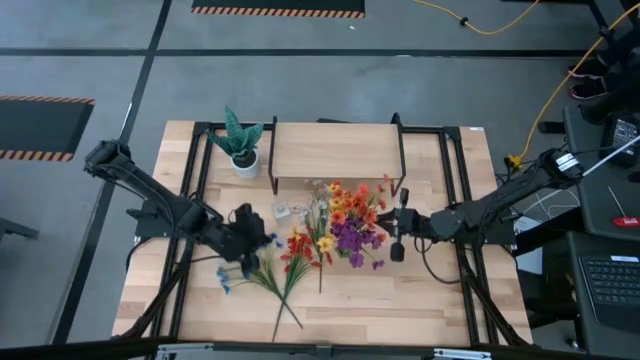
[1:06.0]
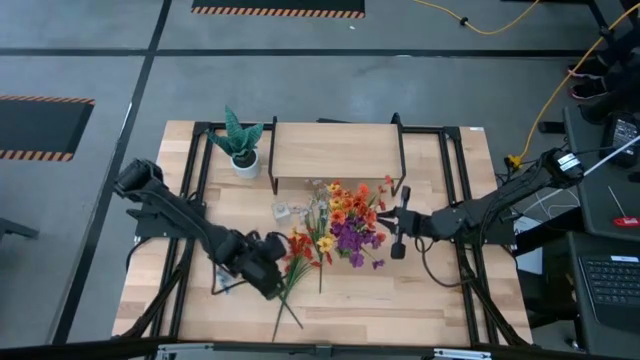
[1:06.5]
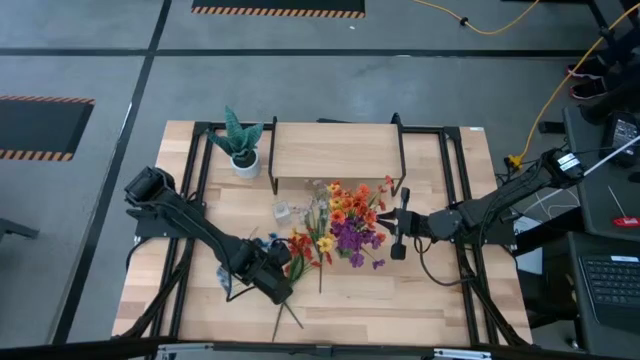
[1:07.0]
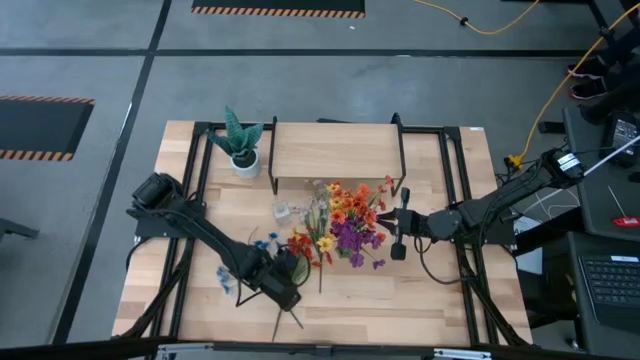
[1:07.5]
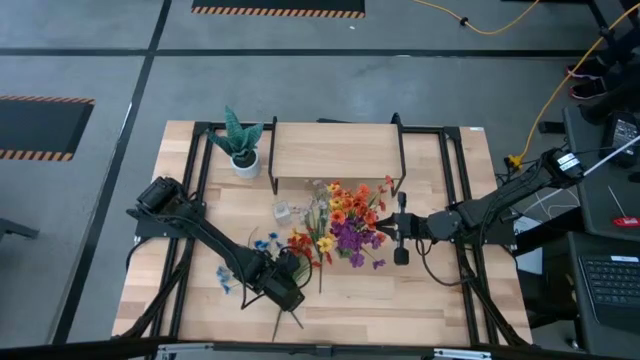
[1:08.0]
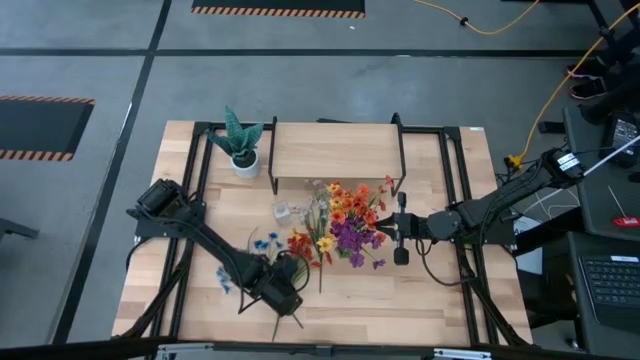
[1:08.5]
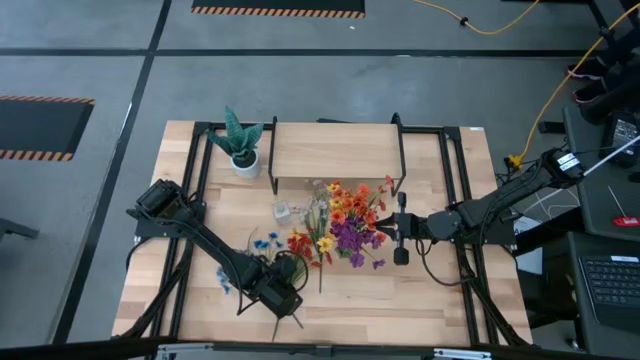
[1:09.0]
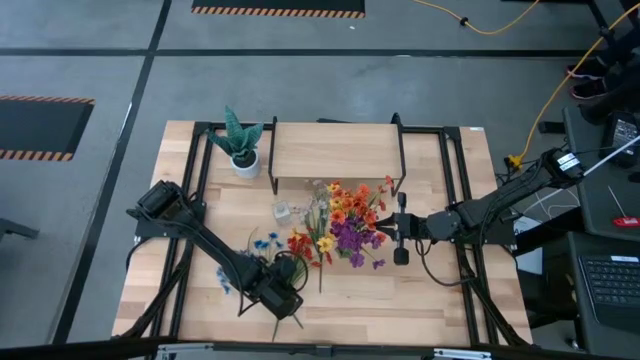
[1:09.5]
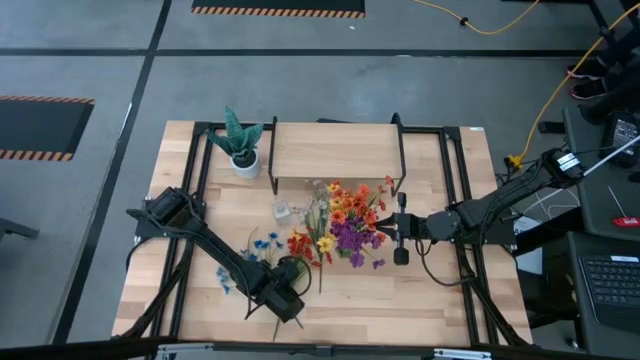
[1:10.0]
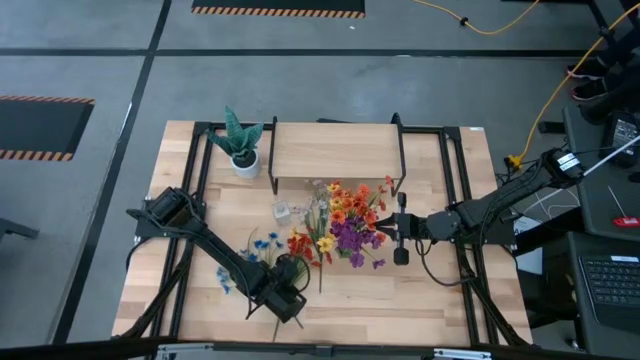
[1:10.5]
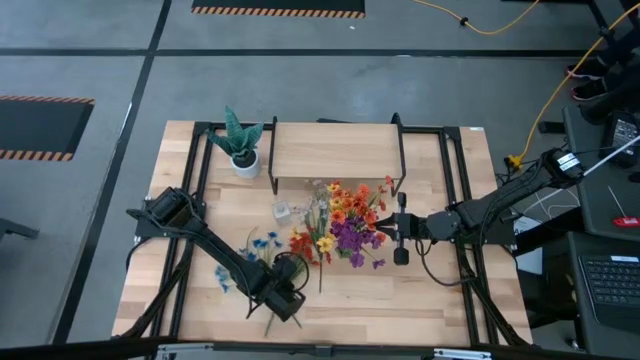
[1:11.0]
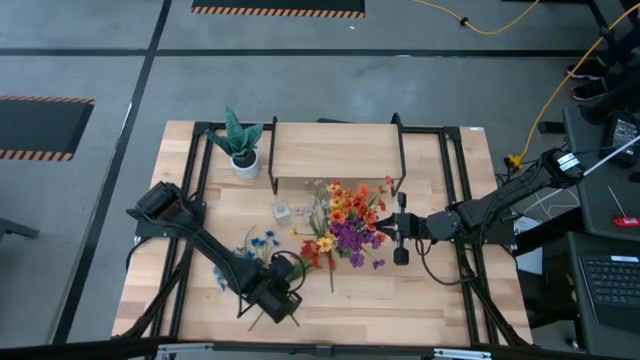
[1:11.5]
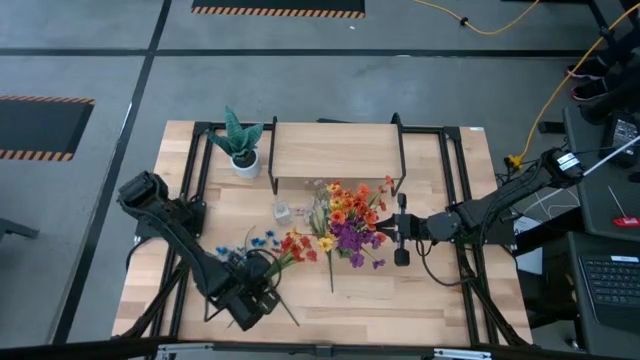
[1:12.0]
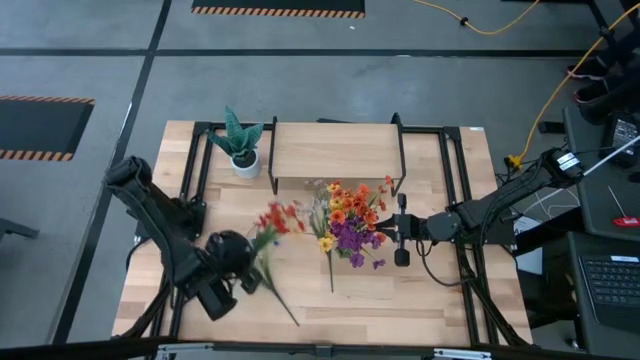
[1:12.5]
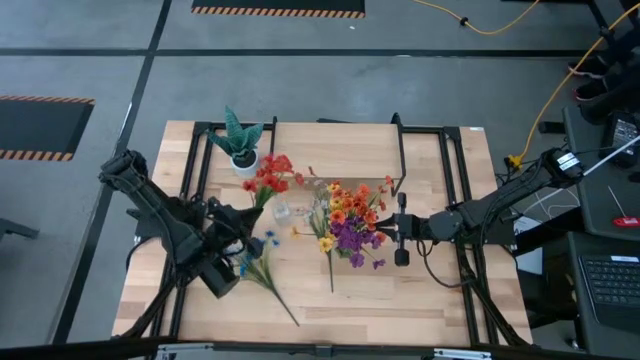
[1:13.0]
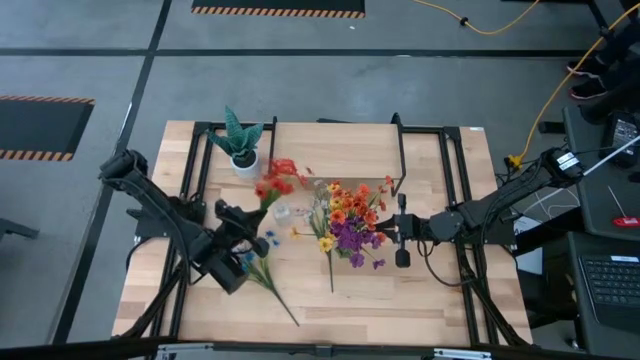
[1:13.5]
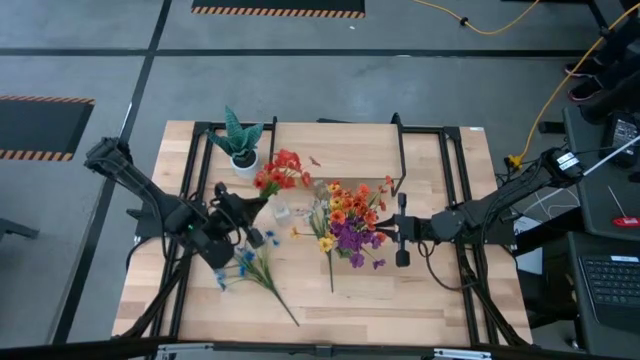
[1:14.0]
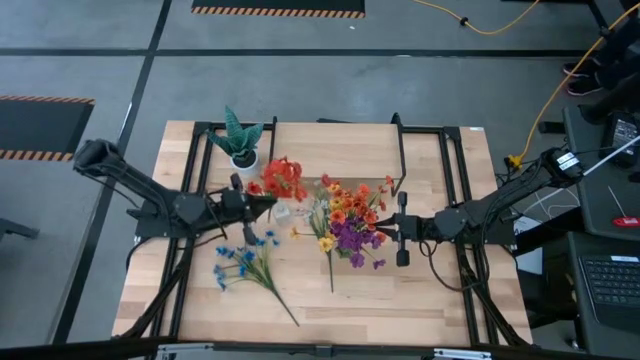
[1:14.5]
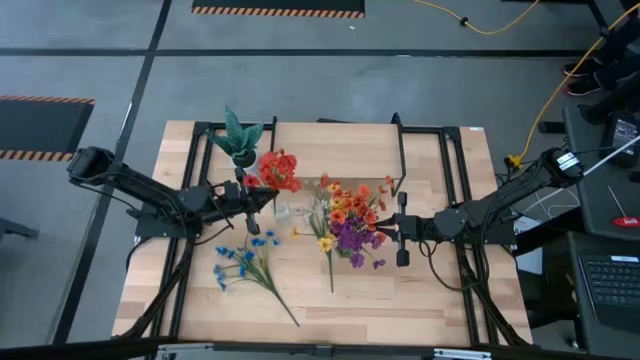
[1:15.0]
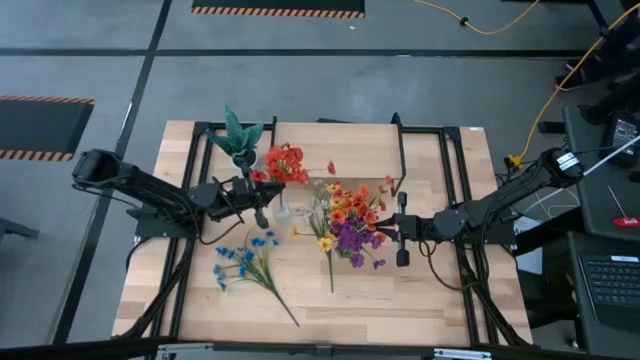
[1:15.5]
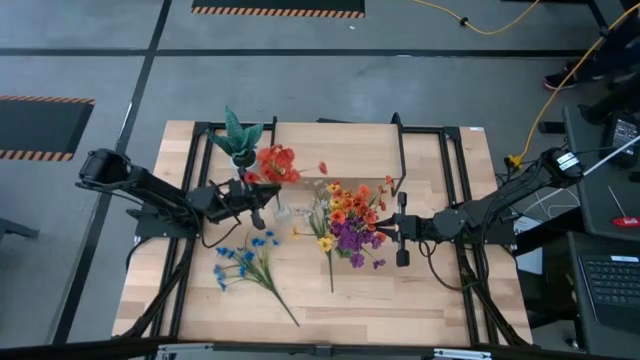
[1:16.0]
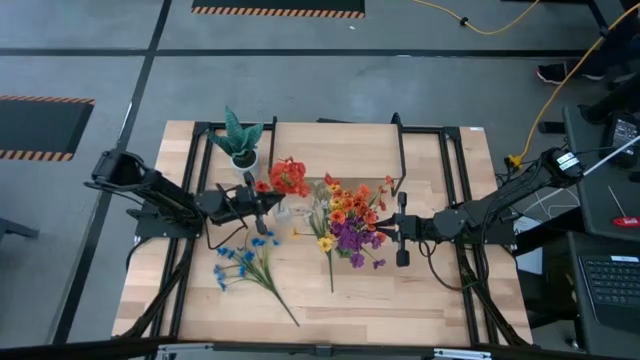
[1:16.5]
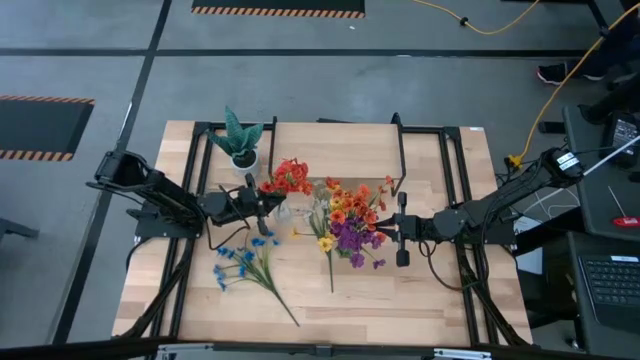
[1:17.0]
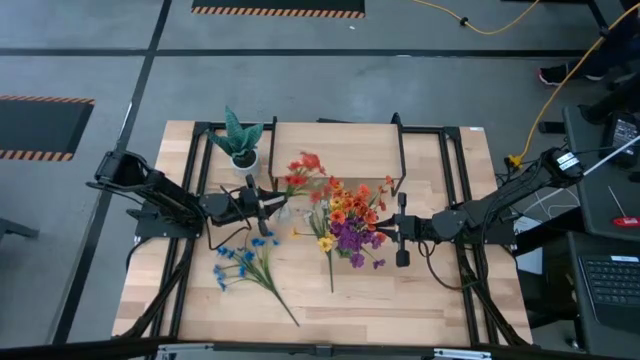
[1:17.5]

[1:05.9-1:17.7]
Task: Pick and place flowers into a vace then onto a shelf
Put the red flowers into the transparent vase

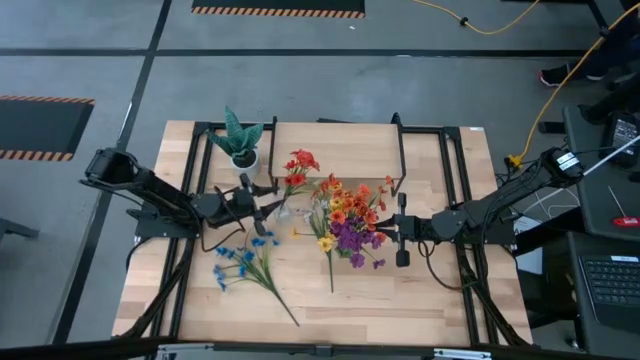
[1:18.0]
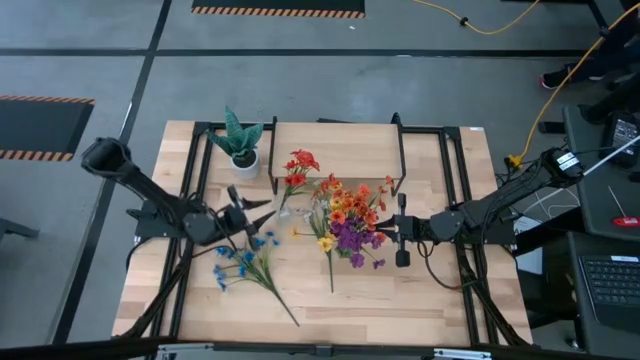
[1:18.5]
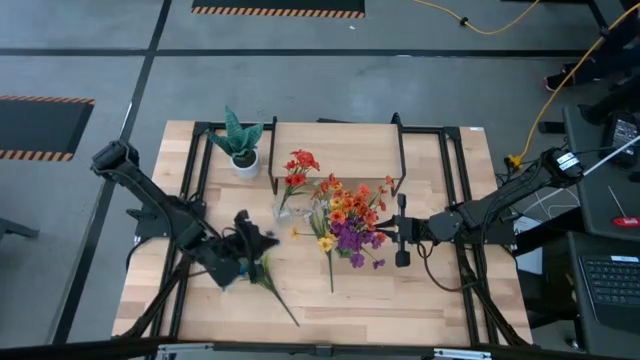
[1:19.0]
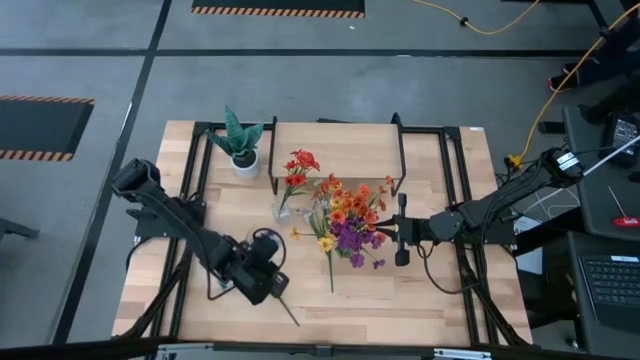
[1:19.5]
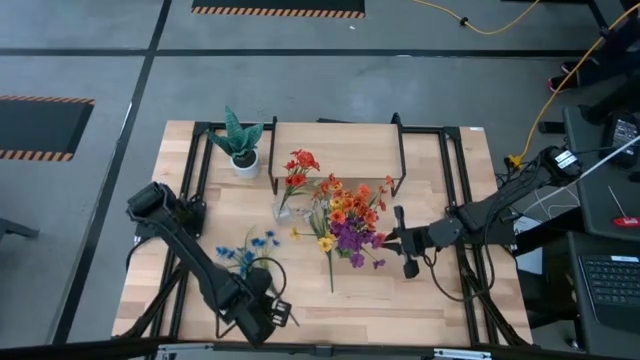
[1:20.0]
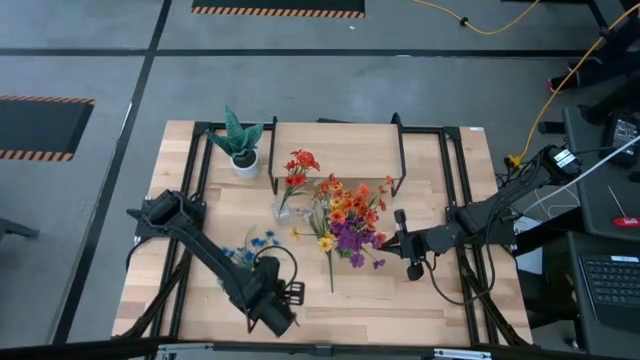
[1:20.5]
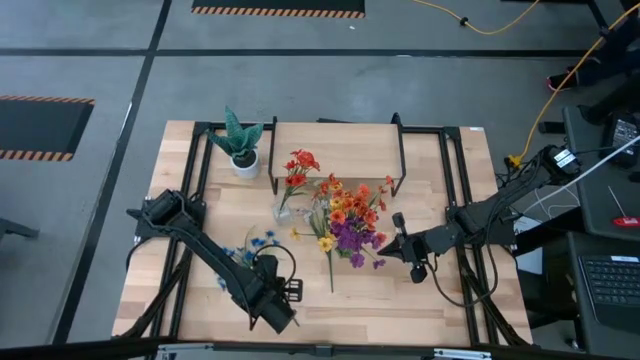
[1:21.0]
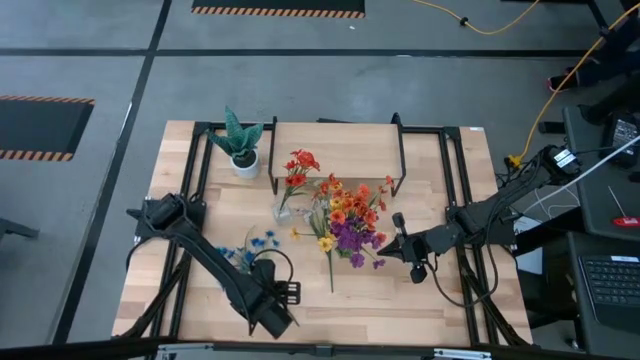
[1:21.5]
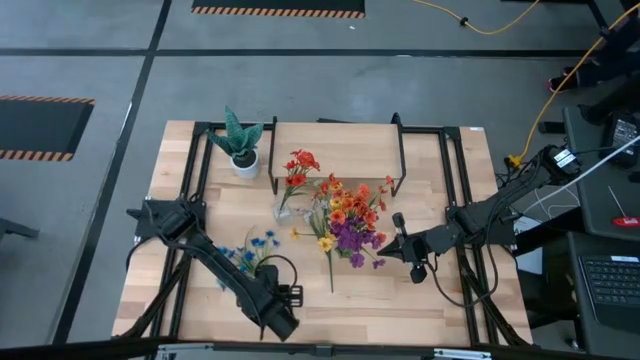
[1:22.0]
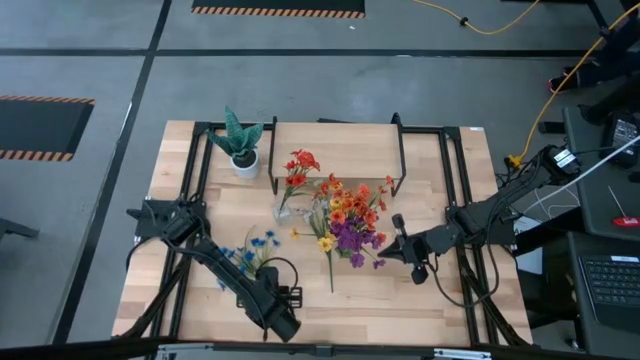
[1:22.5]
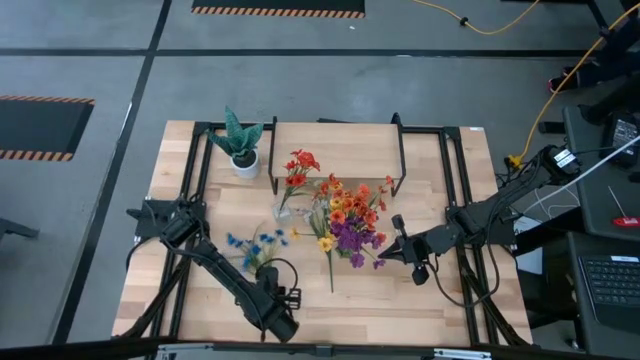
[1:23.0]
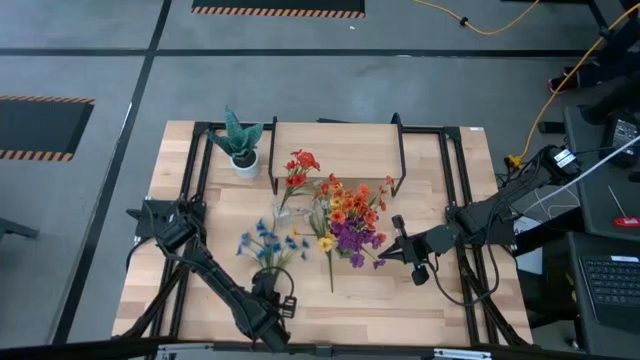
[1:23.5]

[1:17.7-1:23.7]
Put the blue flowers into the transparent vase

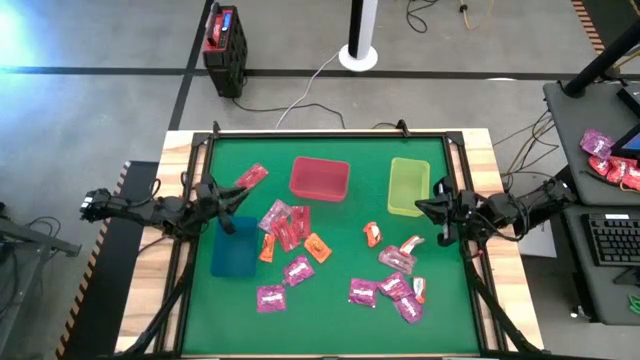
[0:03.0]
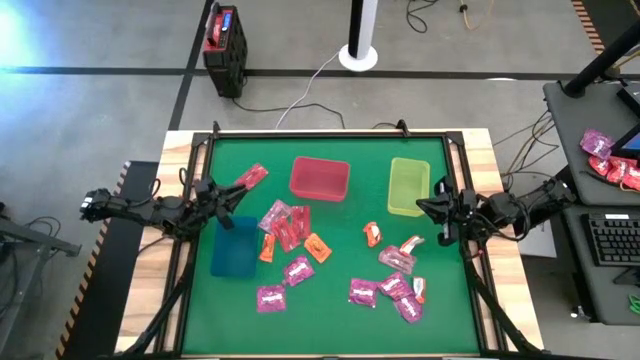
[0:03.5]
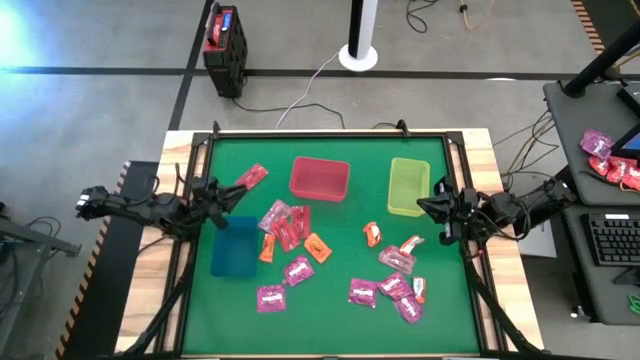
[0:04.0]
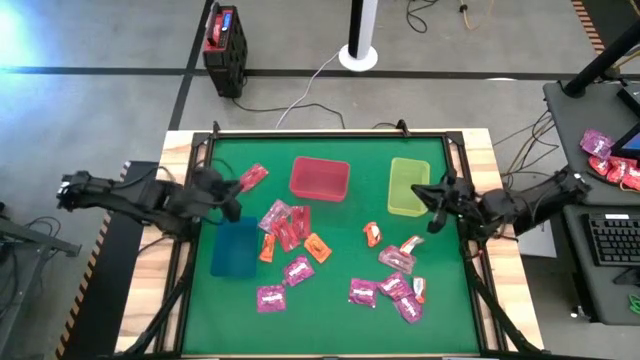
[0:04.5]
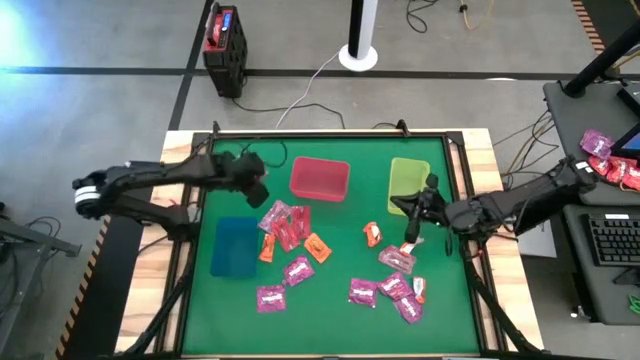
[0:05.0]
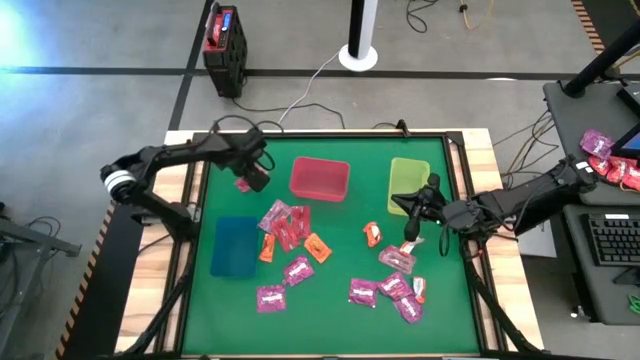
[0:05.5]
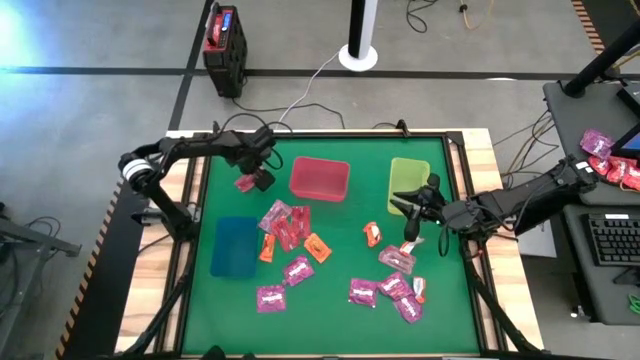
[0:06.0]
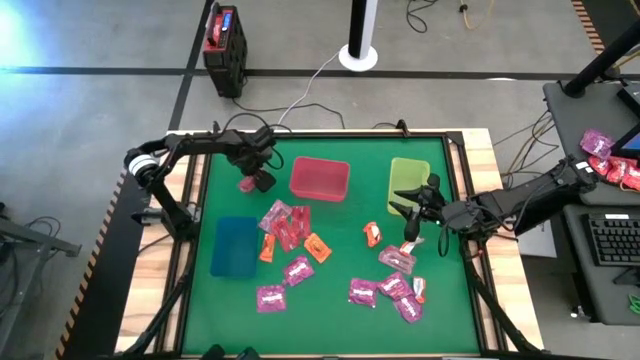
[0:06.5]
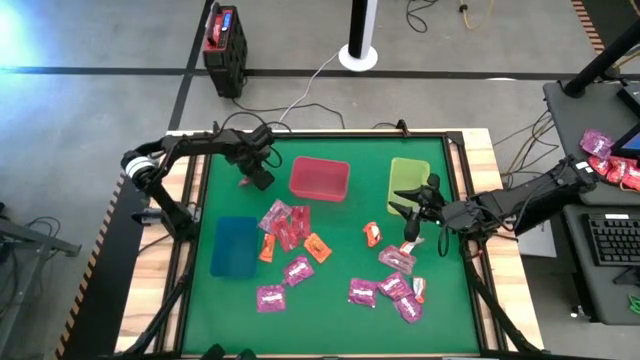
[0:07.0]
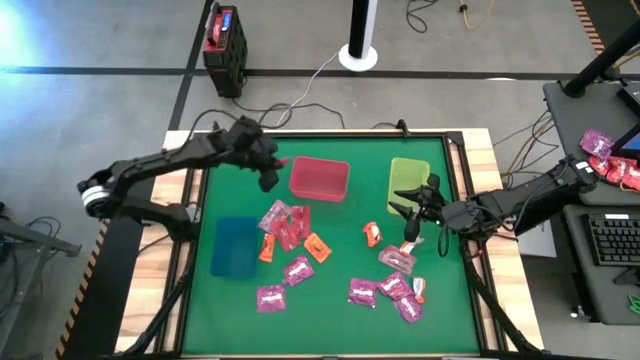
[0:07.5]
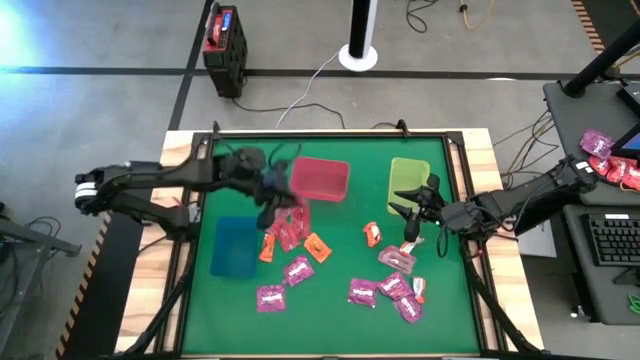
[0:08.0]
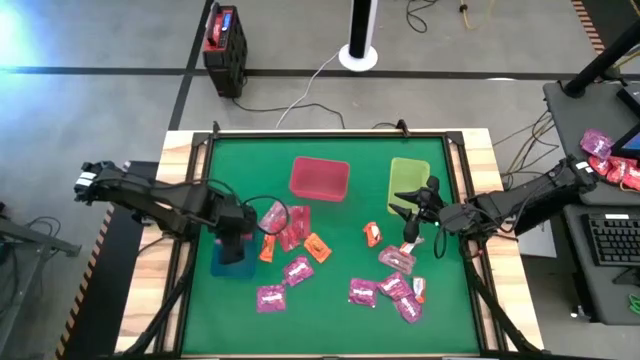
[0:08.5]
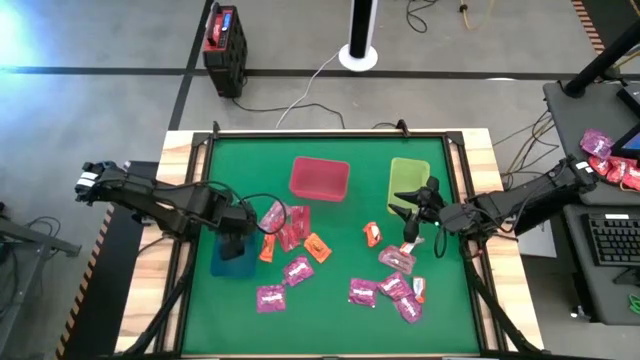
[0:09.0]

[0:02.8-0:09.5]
Task: Sort candy by brand, put in halloween buckets
Put the red candy into the blue bin
